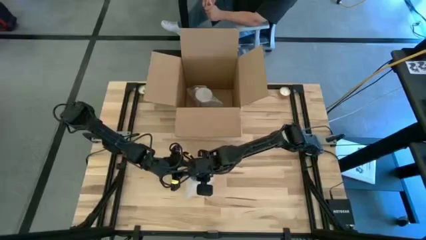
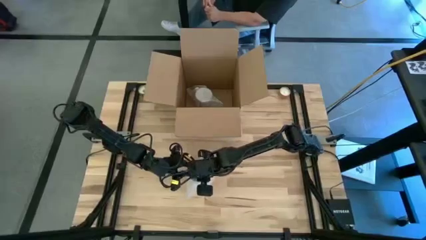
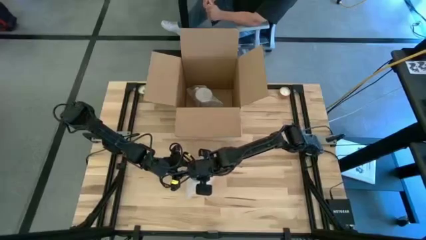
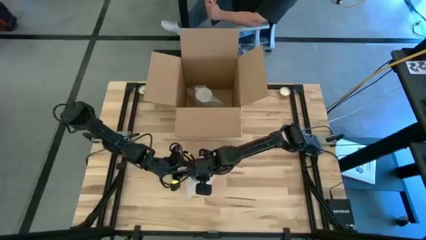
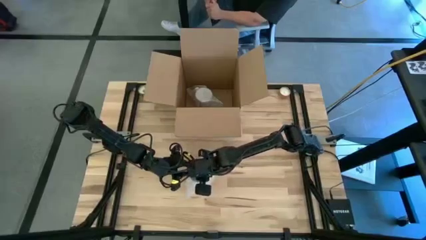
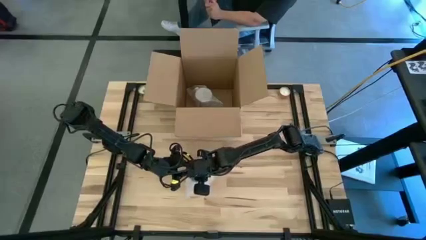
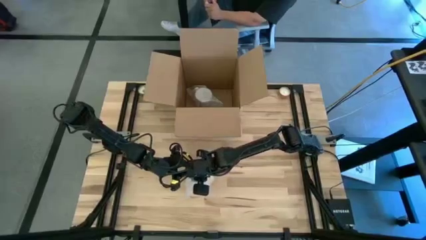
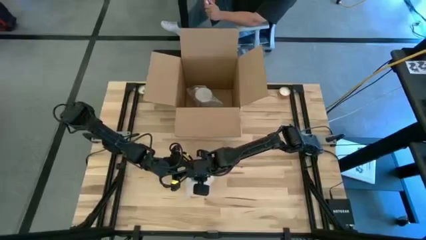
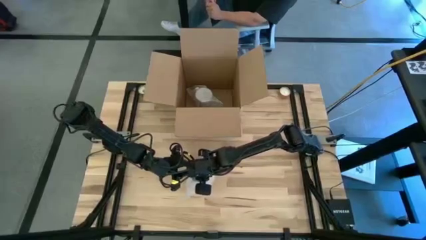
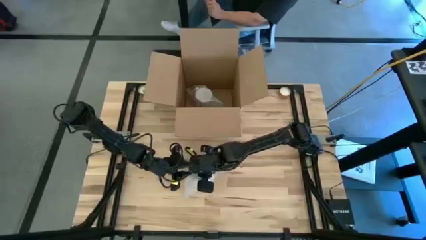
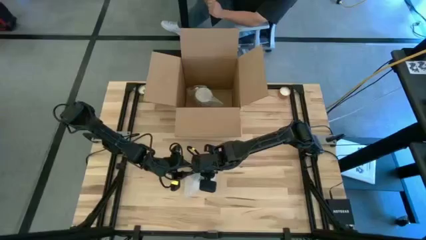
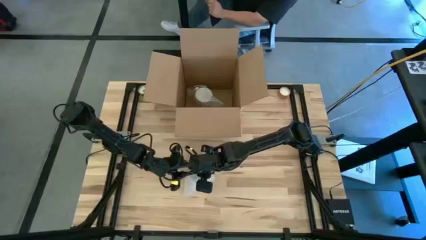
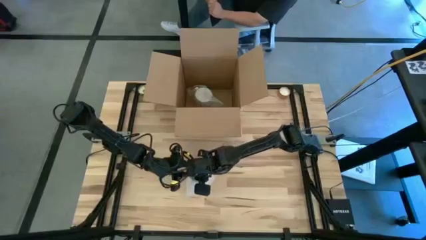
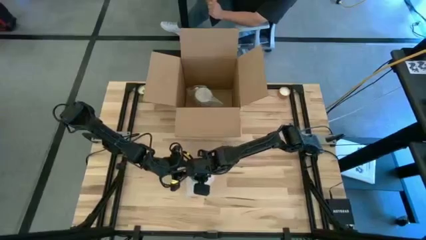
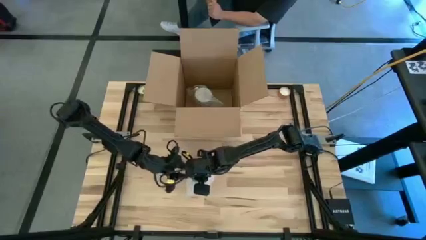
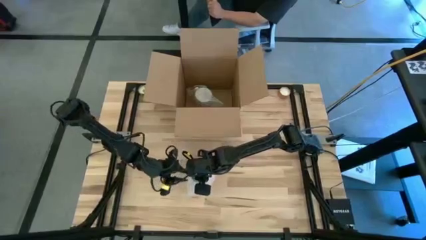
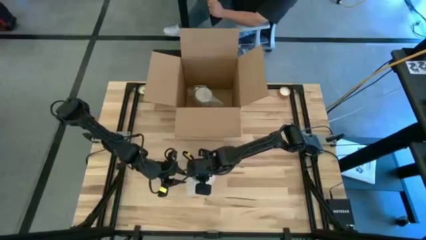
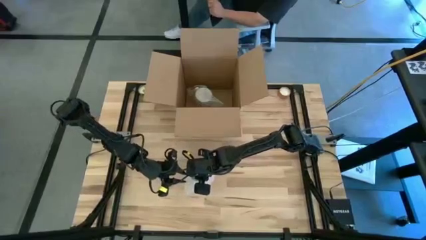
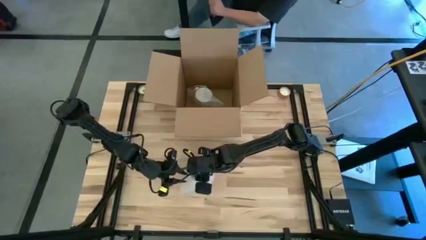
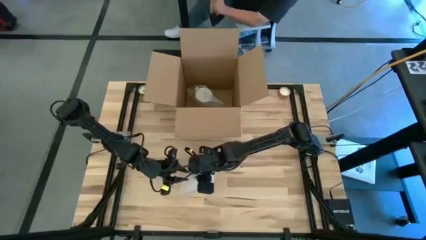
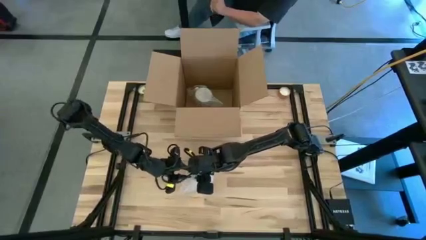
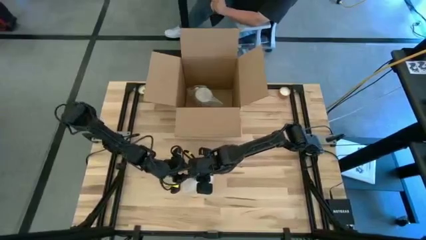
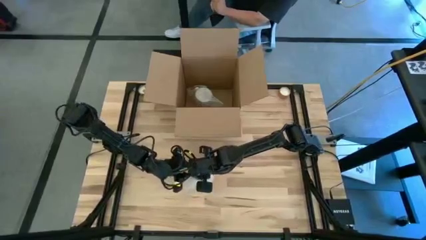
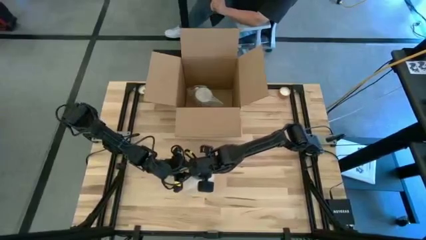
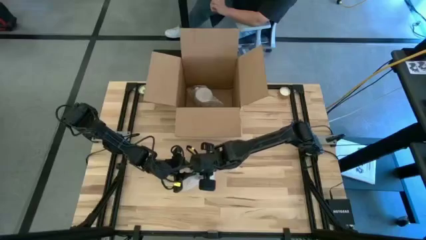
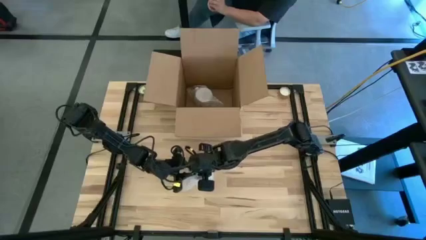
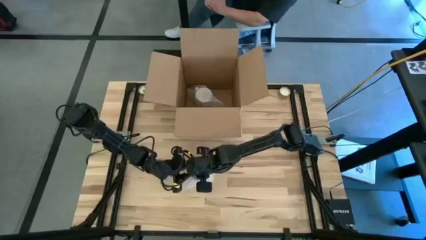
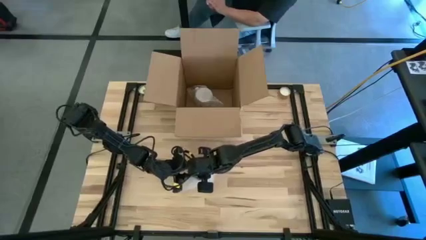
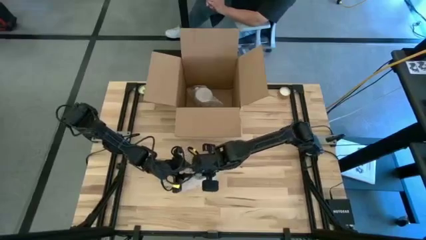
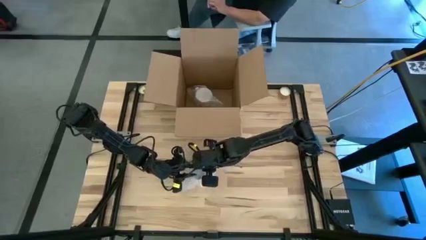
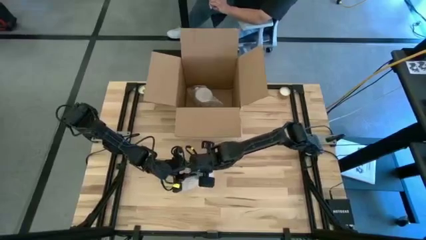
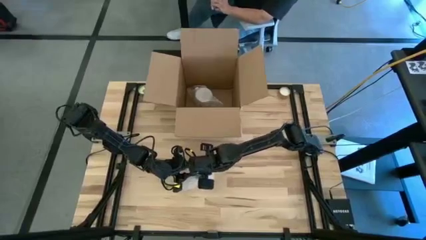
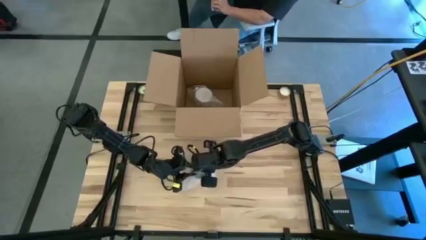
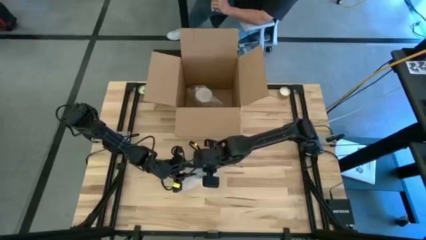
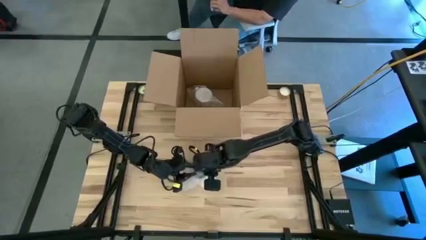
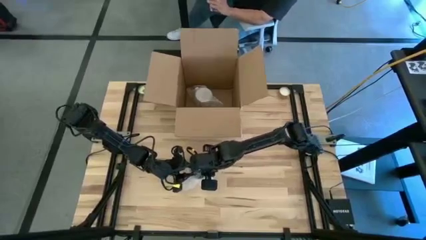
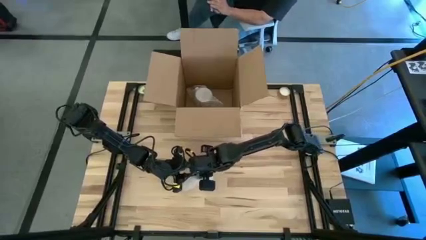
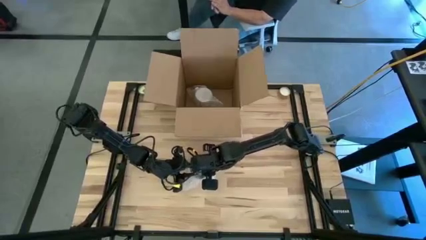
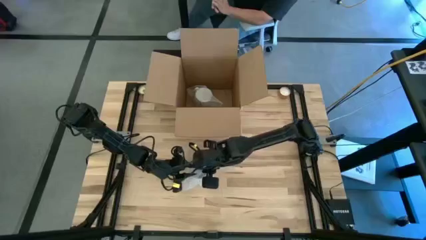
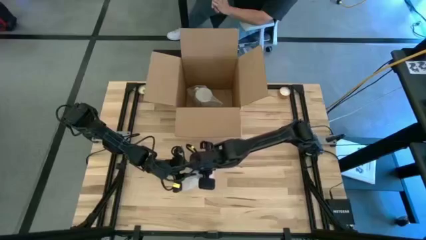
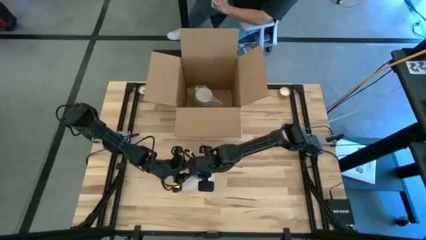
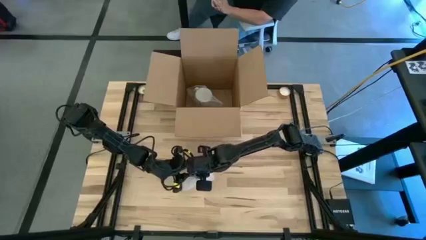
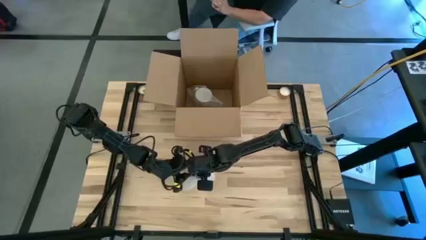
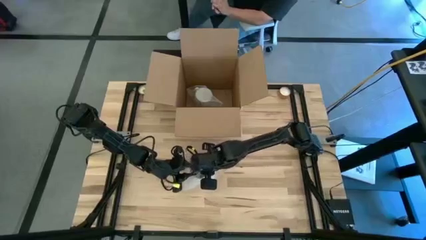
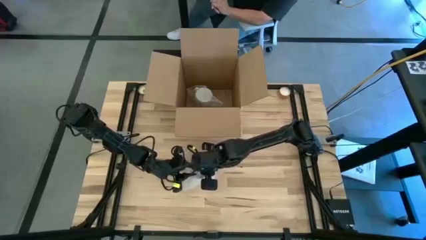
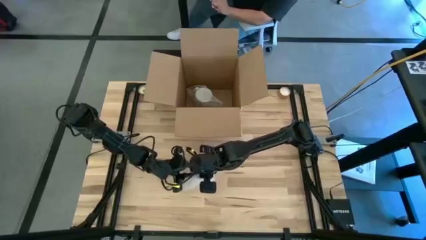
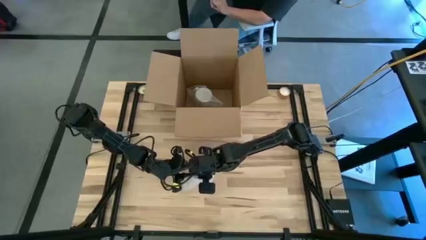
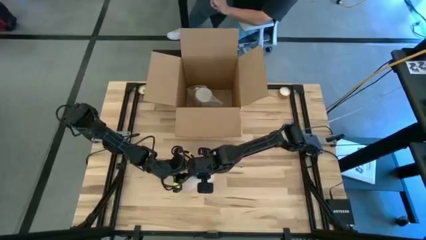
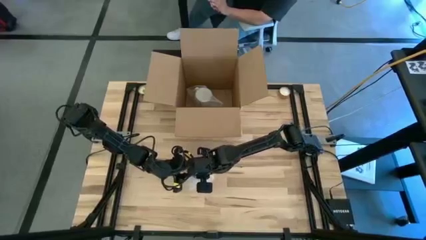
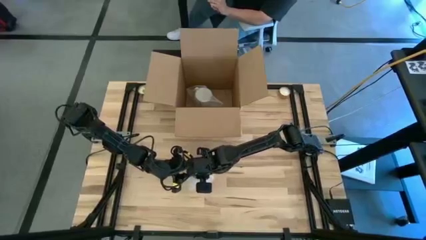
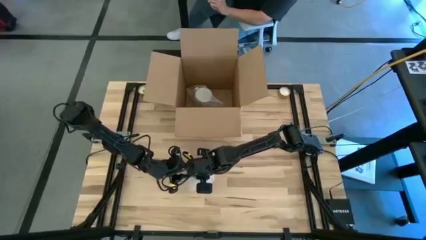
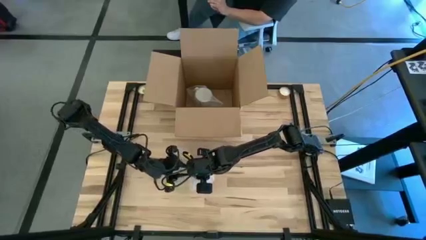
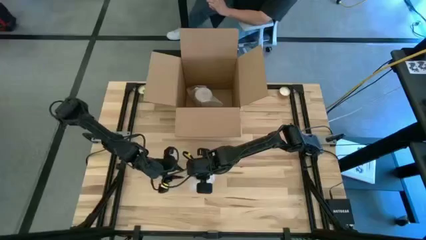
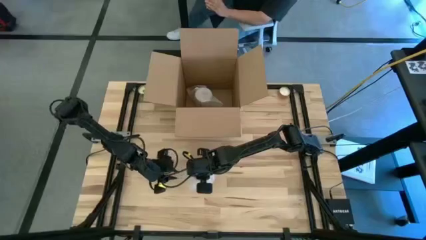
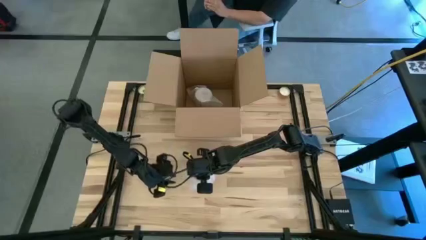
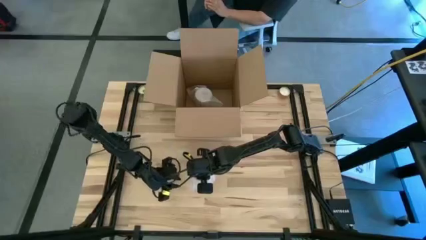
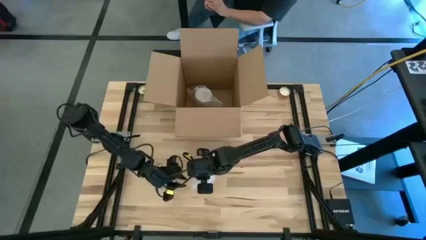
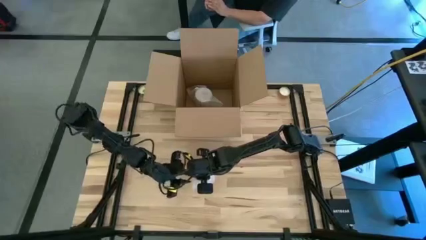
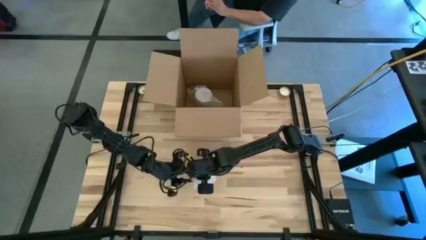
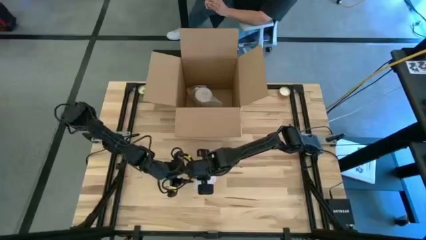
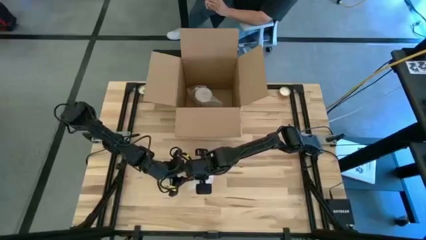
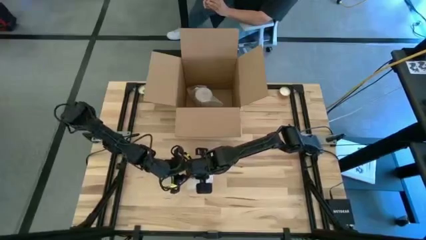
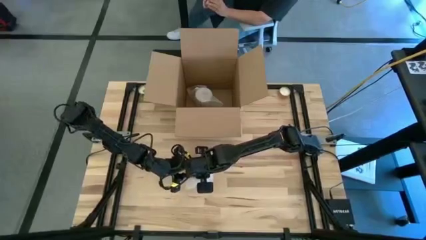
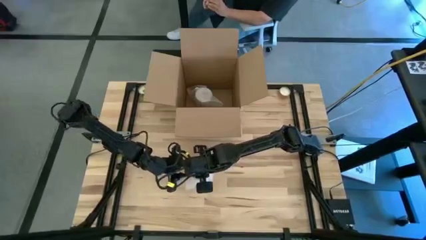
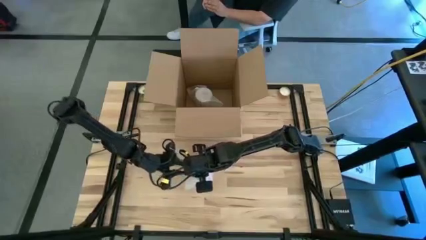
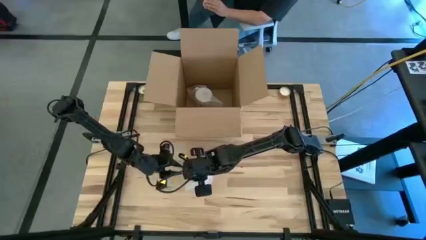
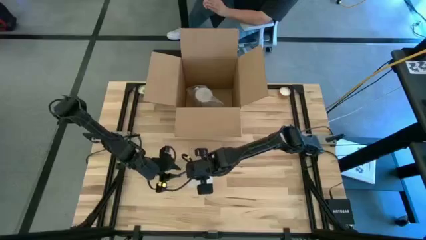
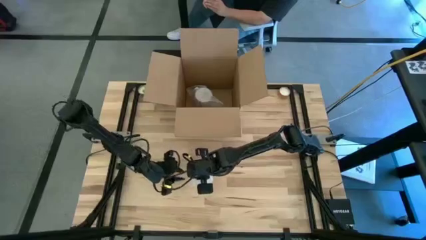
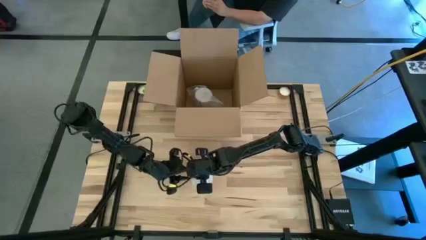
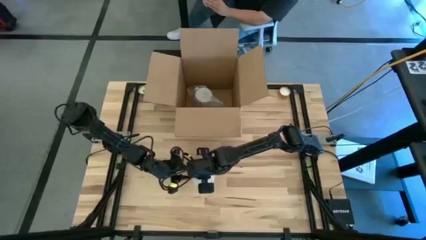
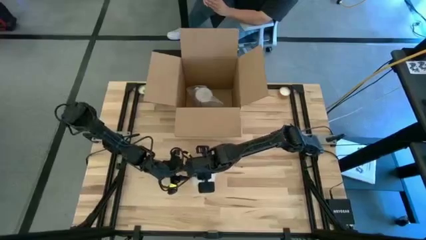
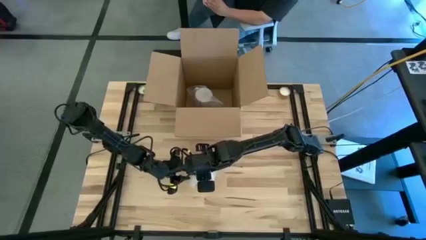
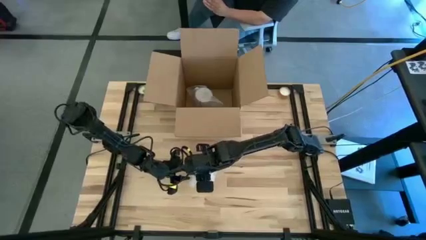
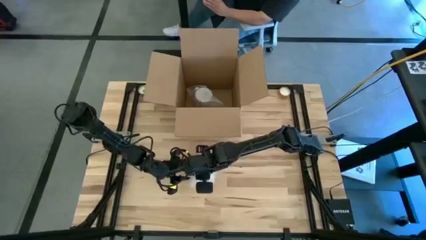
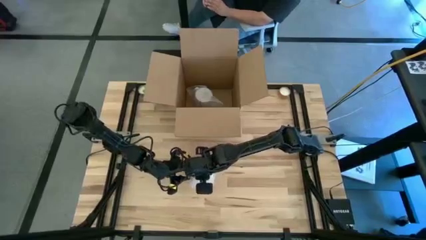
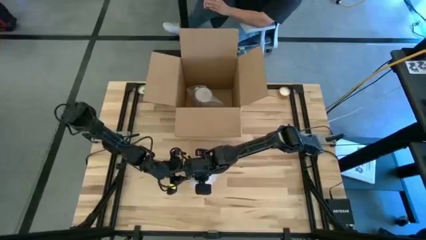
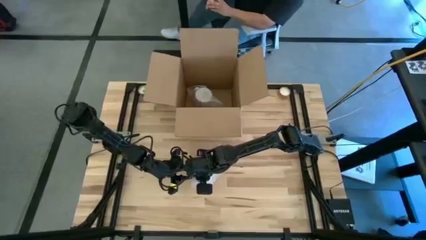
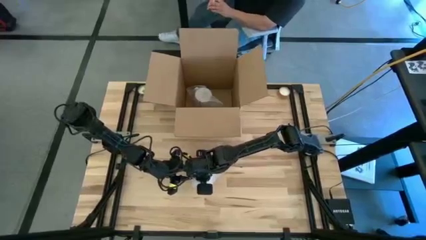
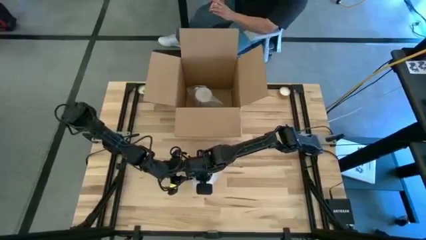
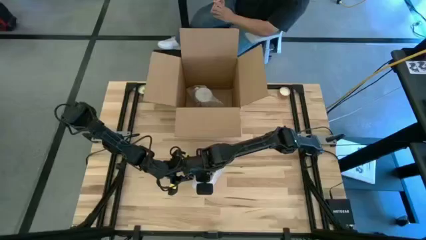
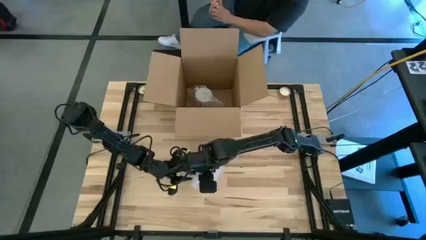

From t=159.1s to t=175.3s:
Task: wrap mug
Wrap the yellow mug with the bubble wrap
